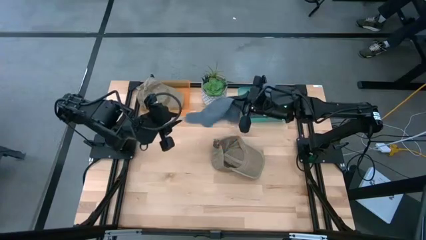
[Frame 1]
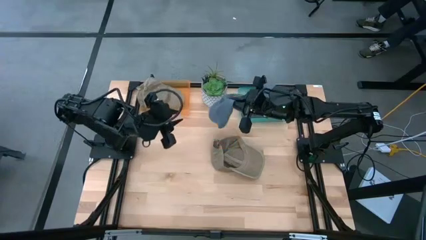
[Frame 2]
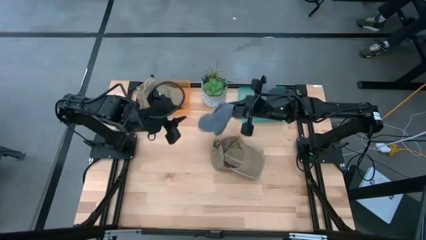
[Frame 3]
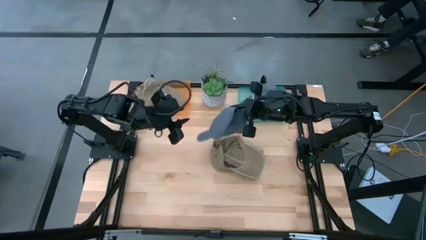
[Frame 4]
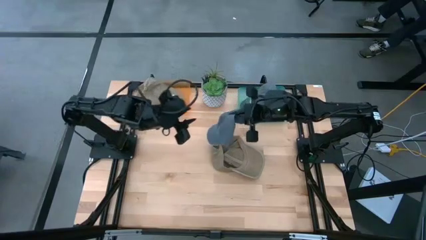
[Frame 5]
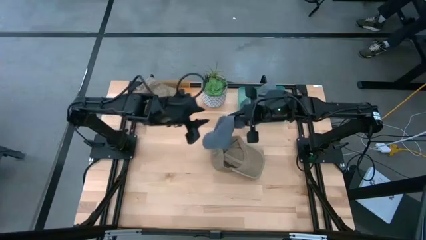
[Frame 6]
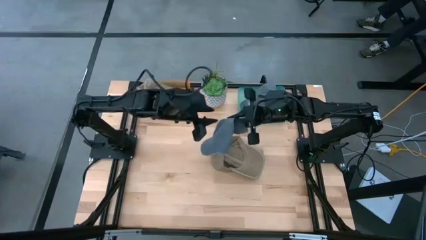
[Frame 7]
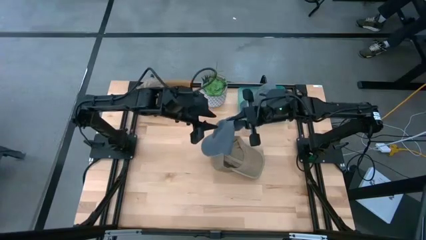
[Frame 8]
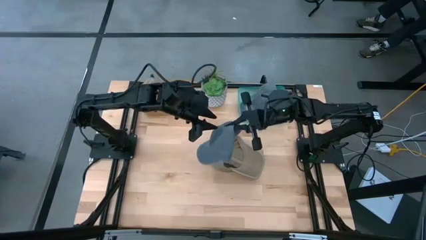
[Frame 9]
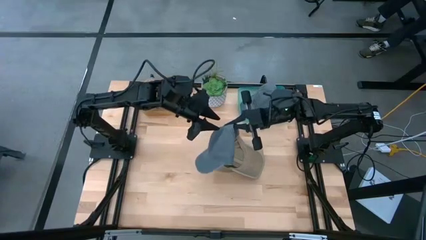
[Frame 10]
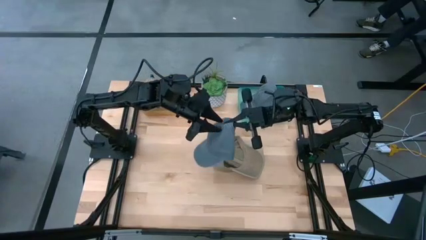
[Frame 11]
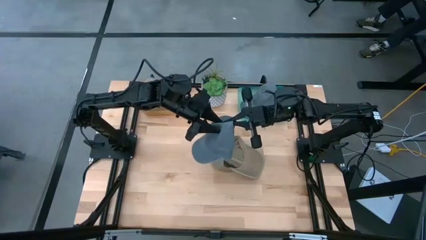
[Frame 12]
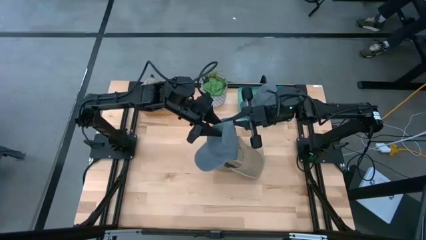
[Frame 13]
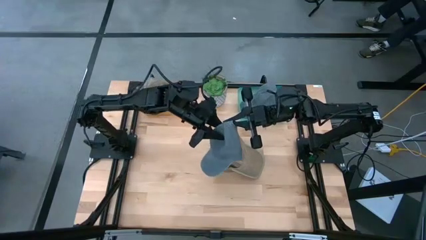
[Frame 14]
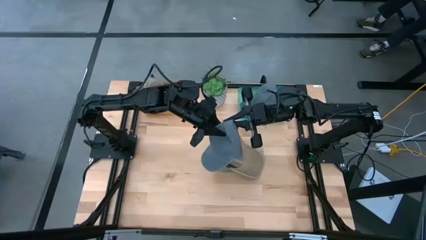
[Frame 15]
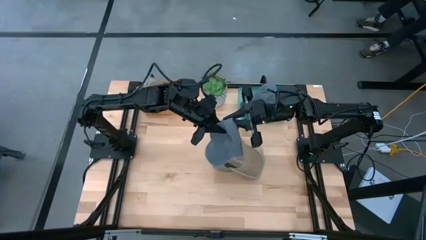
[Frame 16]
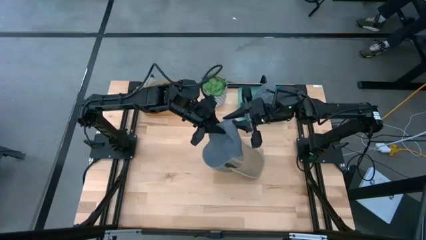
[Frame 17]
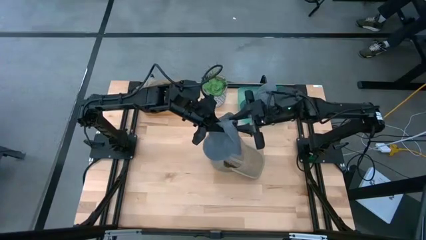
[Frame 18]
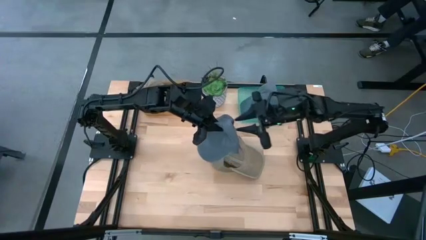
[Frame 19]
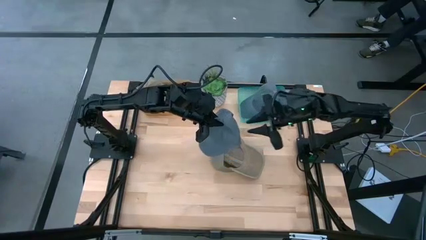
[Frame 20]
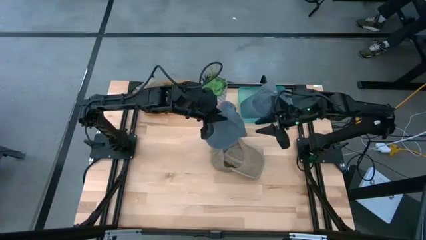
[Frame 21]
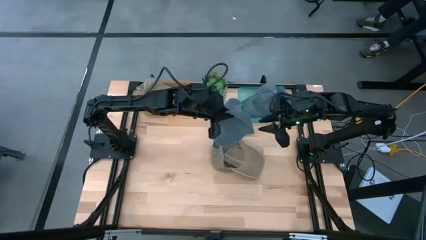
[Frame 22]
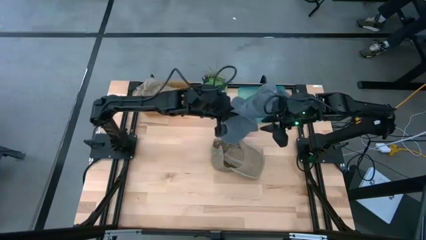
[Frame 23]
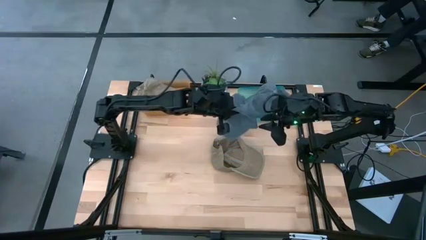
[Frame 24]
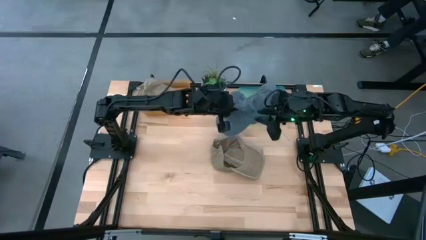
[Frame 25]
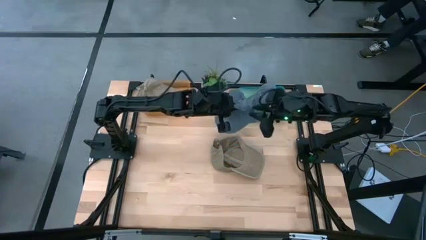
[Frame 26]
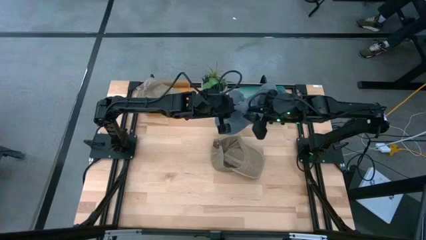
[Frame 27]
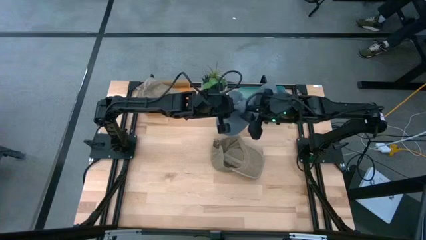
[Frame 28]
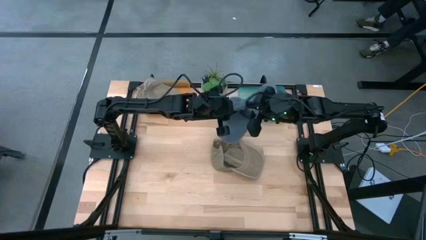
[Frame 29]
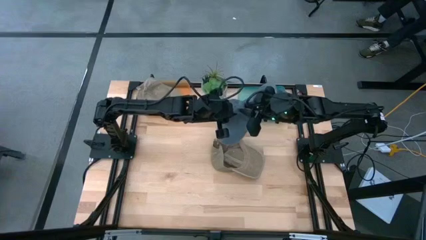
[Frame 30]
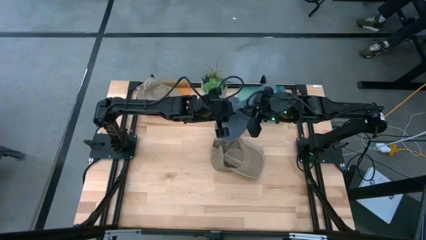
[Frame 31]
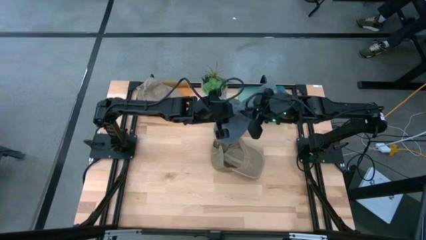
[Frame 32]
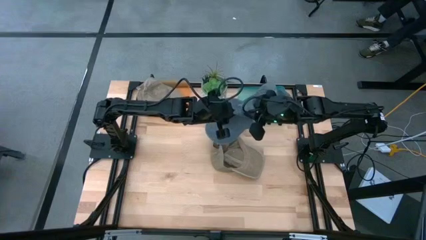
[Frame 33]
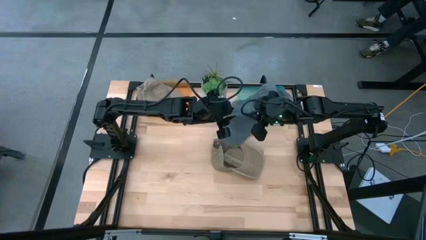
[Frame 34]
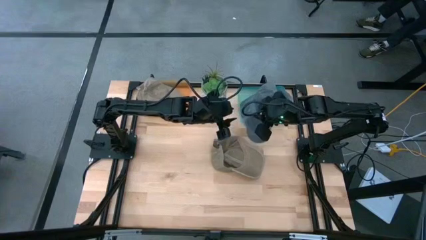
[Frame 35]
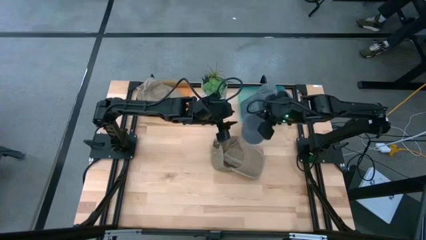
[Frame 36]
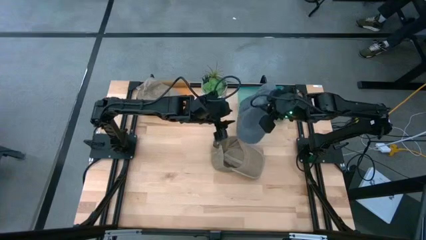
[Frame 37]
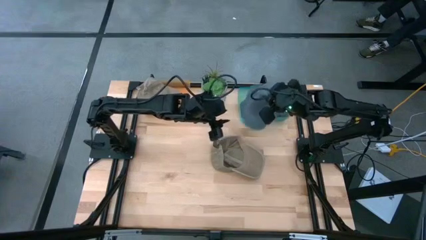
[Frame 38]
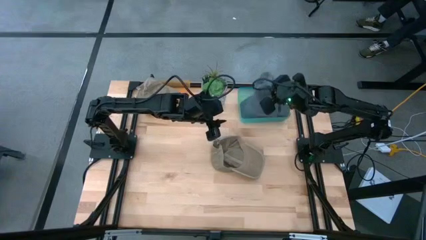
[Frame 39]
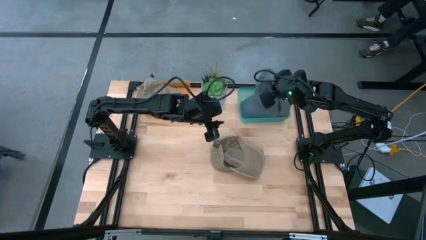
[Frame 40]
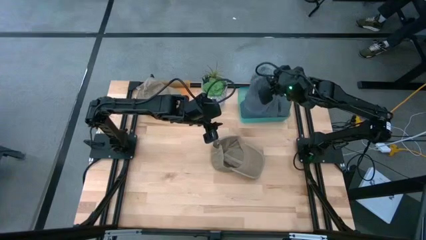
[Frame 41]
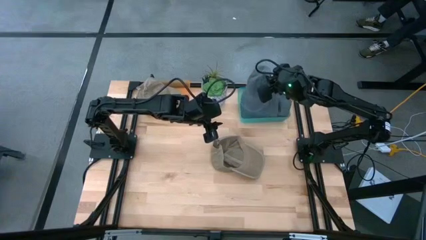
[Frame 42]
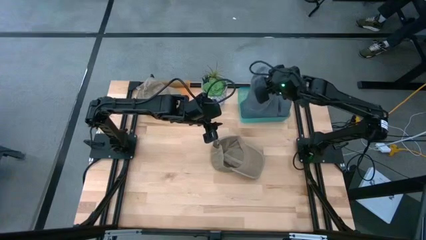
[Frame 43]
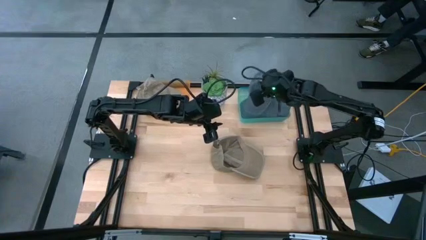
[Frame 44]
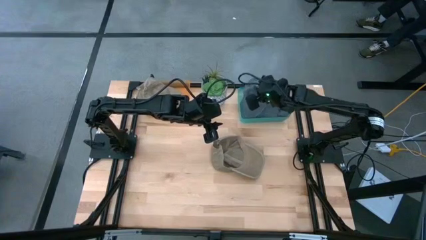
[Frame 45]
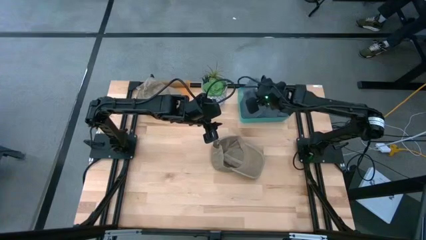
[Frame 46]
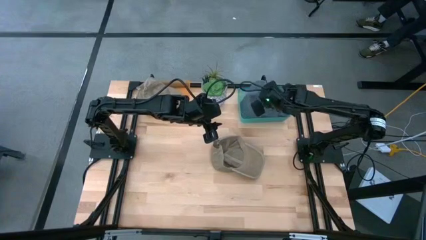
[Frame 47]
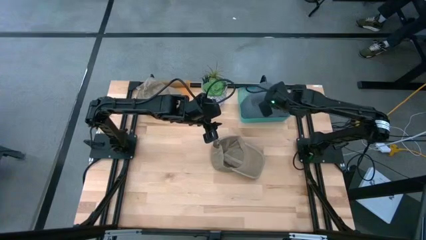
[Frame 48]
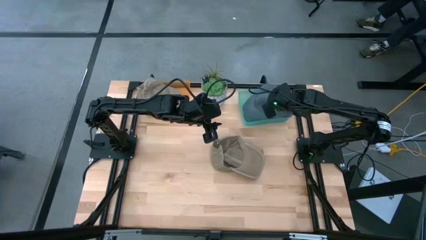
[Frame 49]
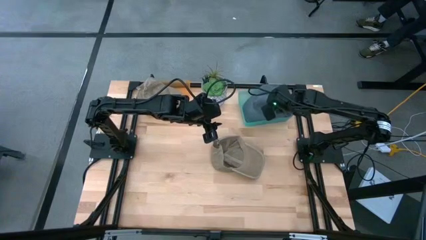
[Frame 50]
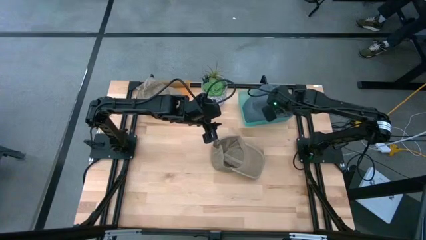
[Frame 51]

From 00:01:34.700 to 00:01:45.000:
Task: Pick & Place hat
Put the gray cap into the green bin

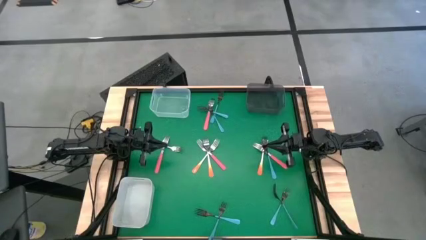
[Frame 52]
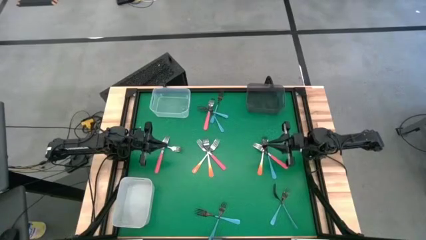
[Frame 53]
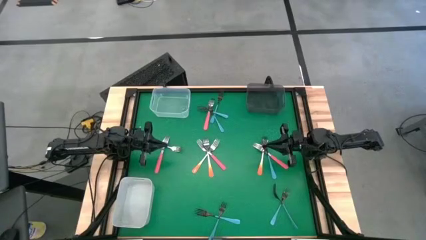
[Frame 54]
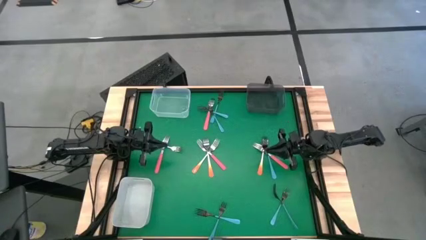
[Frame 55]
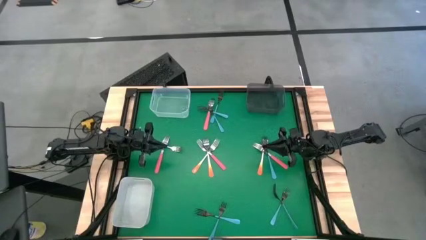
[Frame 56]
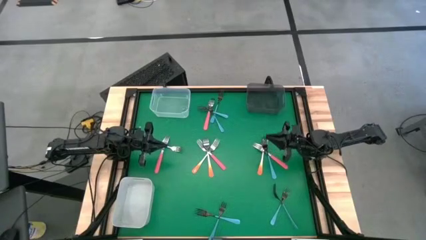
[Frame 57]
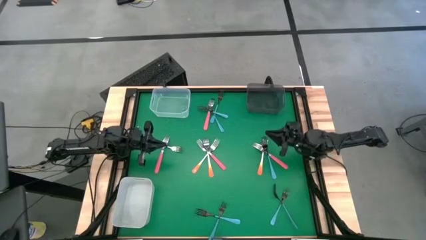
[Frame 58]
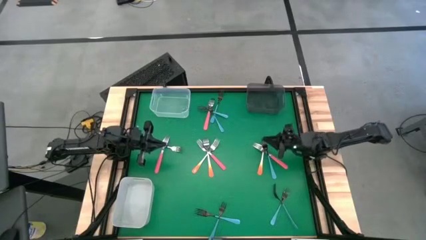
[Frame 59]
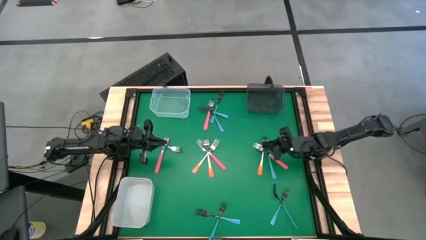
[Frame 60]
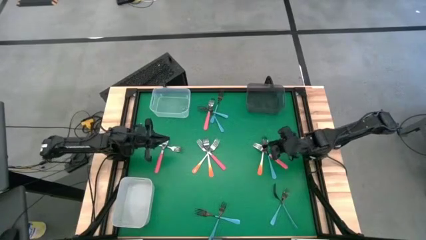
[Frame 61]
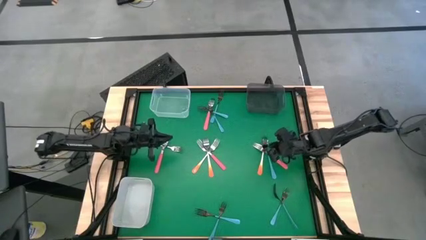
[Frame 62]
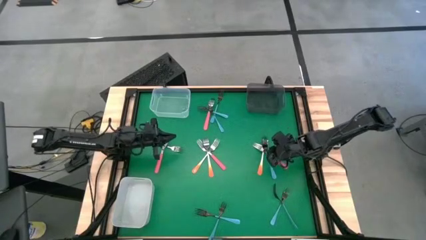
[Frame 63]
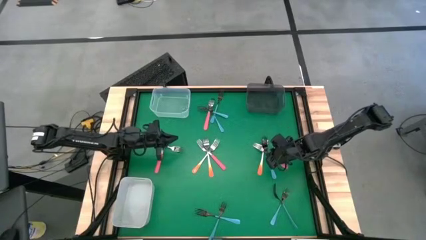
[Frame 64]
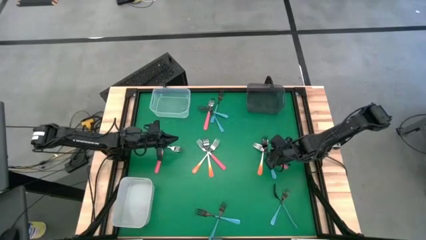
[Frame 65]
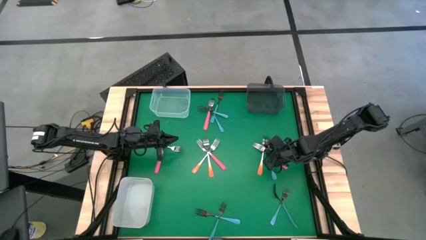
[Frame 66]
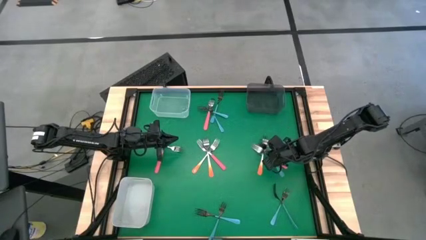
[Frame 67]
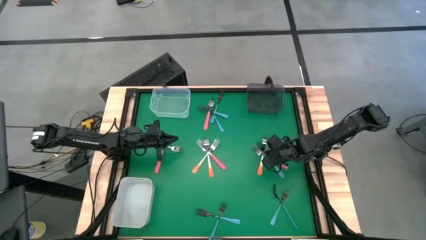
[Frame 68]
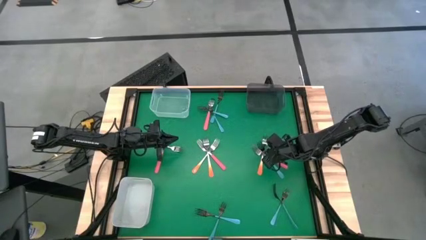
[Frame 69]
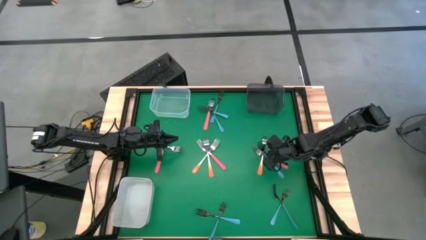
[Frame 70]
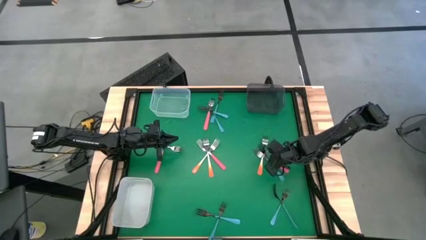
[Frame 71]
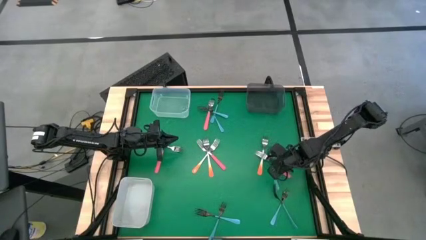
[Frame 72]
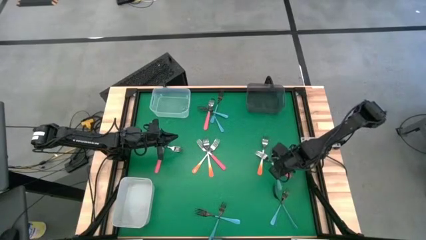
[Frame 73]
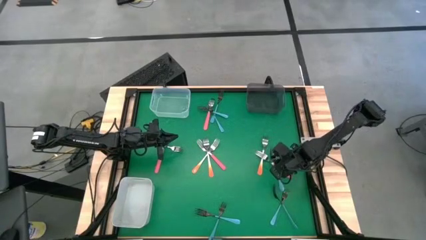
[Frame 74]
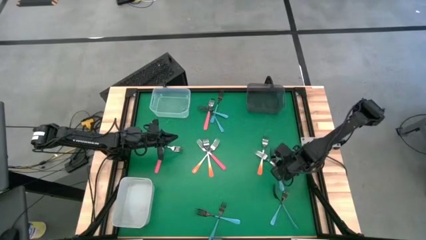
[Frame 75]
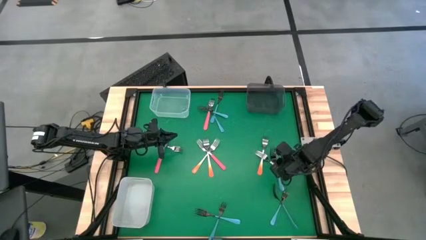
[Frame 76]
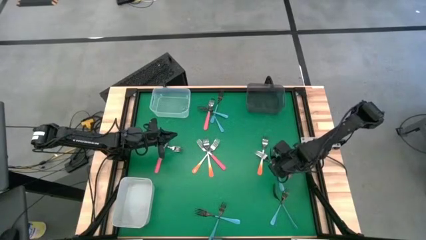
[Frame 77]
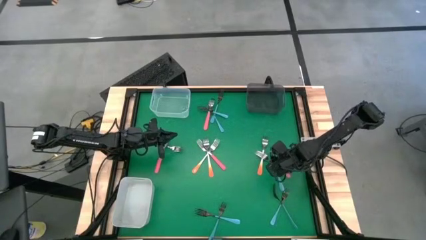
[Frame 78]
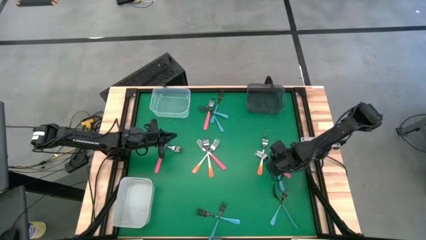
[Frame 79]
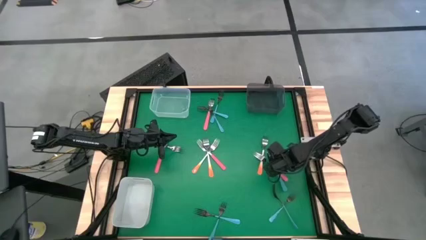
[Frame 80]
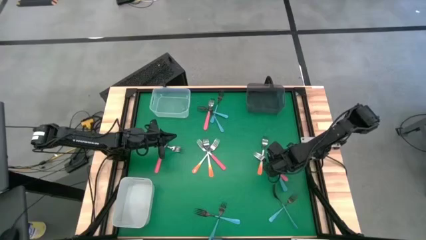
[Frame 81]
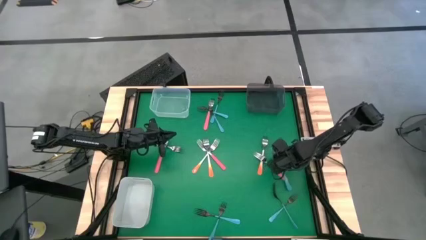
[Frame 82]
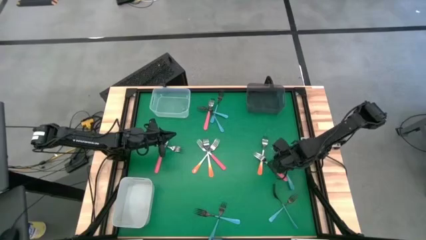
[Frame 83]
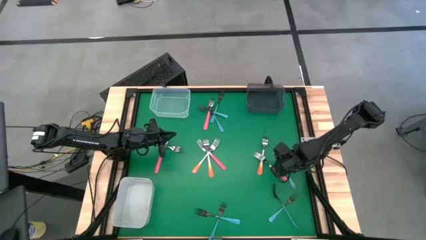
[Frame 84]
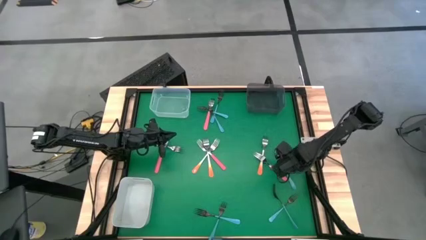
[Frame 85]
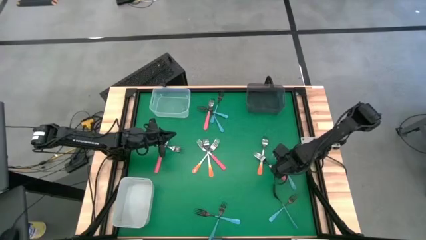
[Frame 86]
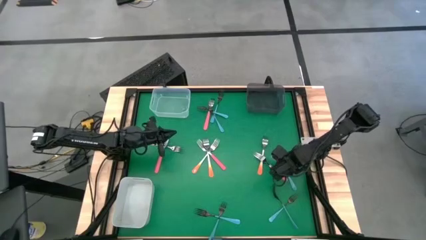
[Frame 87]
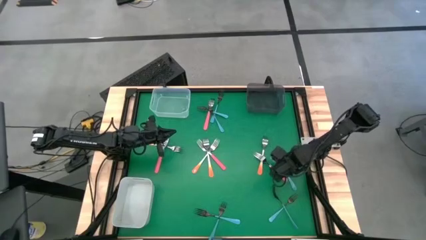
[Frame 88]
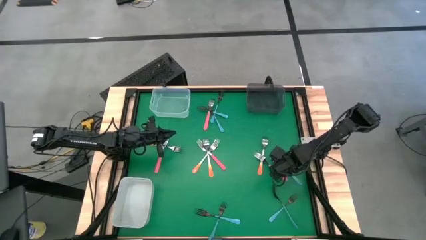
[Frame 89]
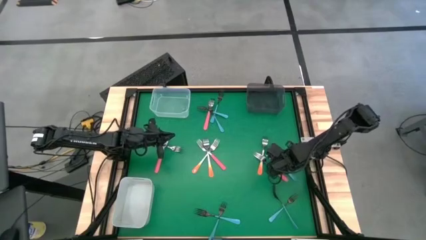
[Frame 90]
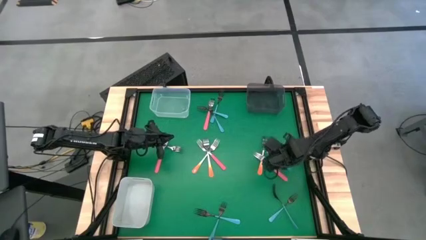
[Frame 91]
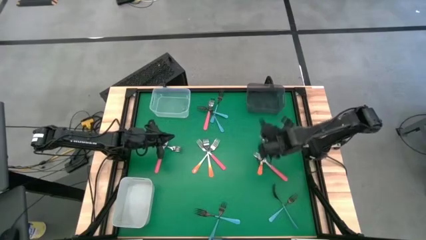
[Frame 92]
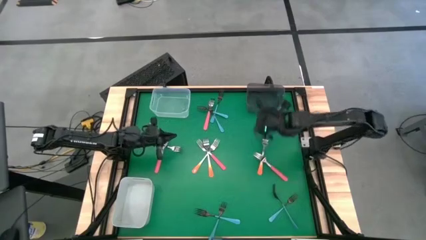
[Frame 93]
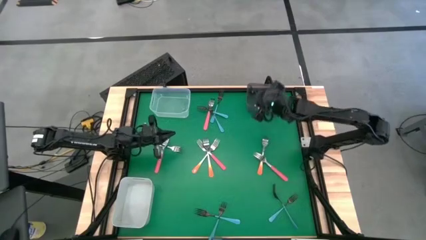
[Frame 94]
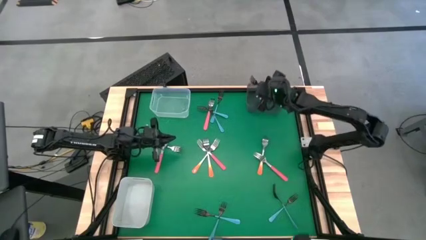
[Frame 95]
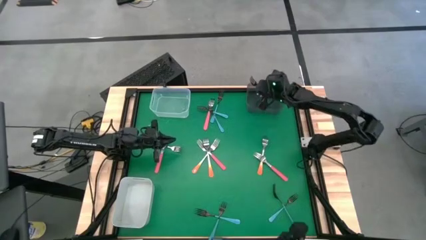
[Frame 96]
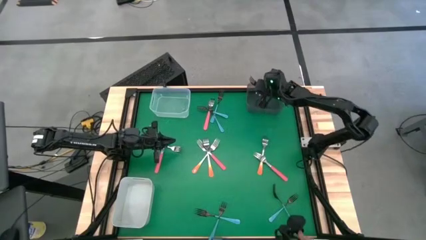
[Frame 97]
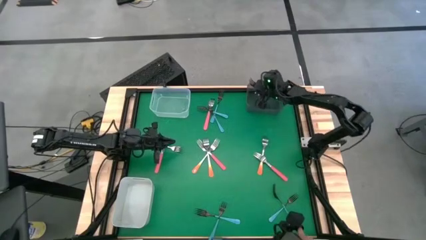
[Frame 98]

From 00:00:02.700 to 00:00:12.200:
Task: Sort silverware by color (type)
Put the blue fork into the black bin
